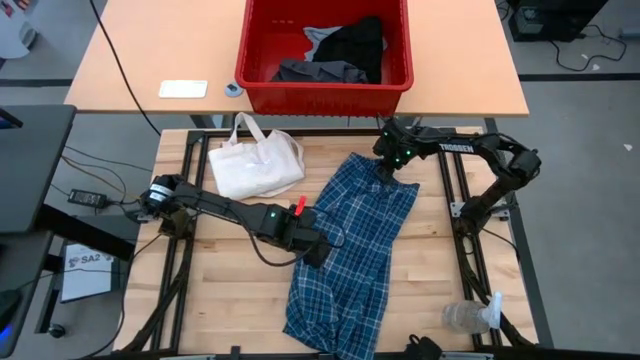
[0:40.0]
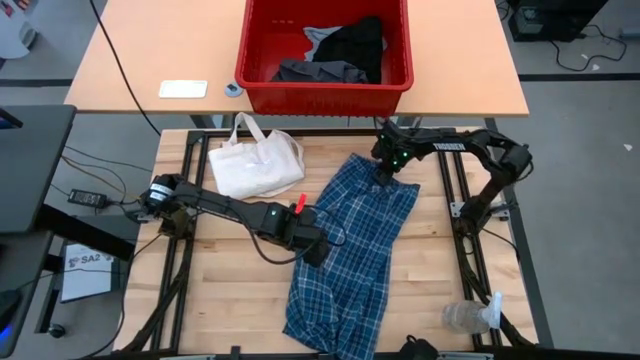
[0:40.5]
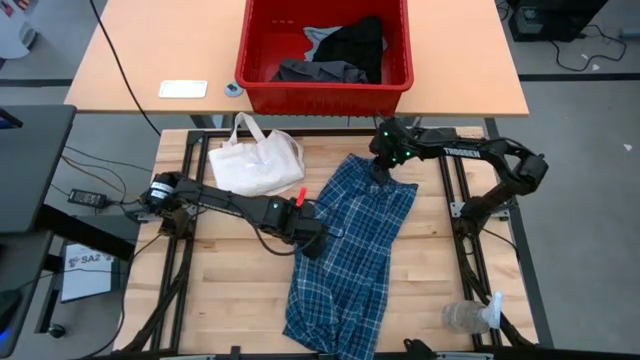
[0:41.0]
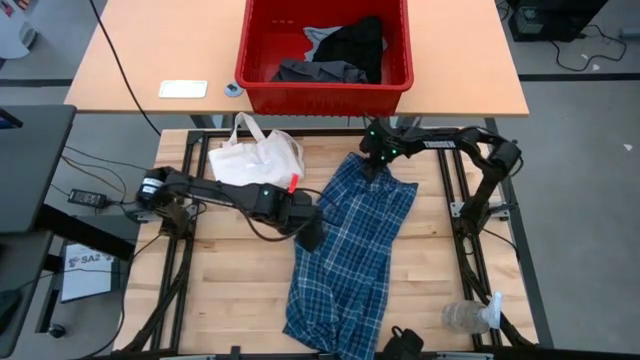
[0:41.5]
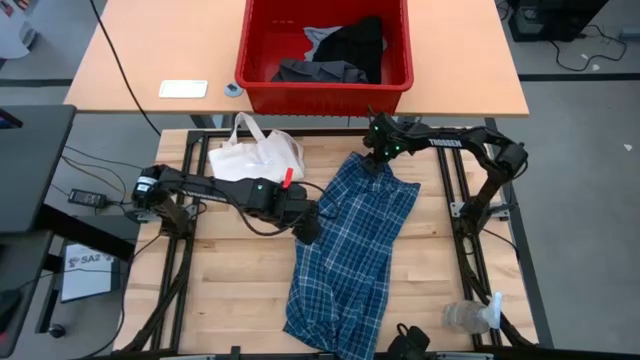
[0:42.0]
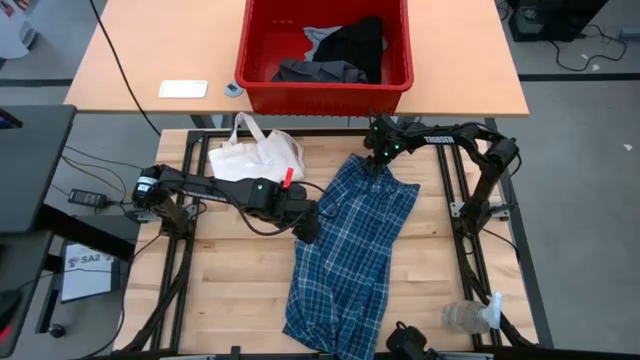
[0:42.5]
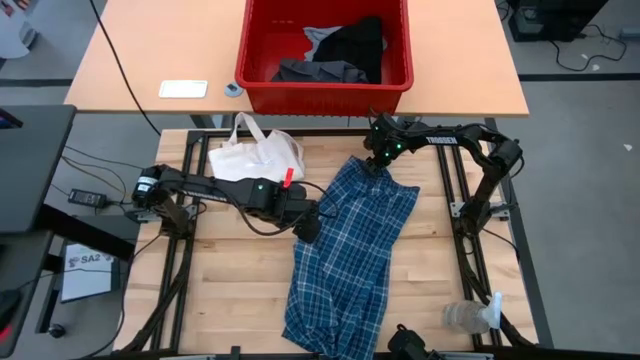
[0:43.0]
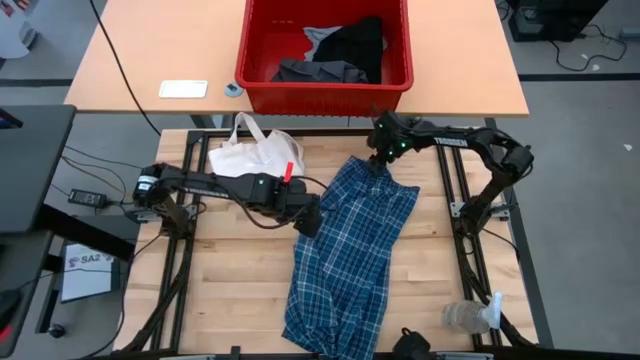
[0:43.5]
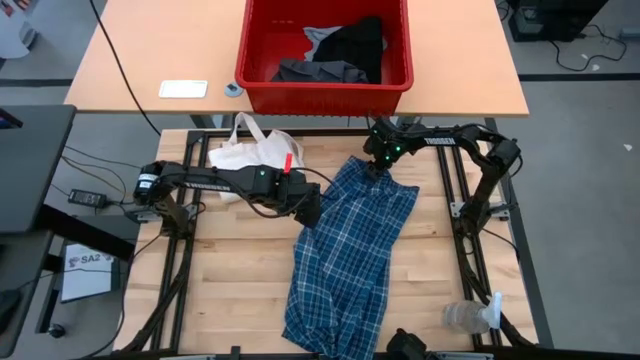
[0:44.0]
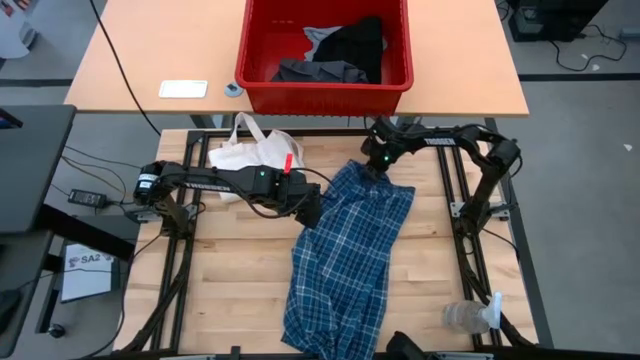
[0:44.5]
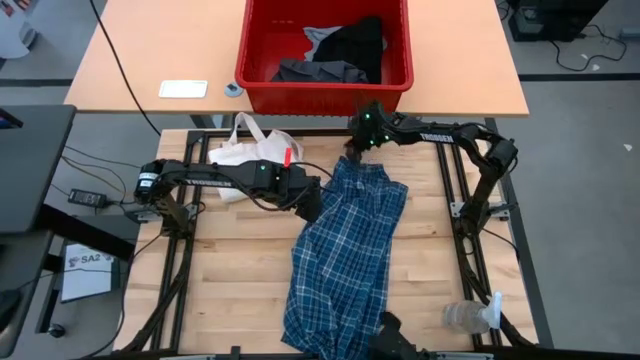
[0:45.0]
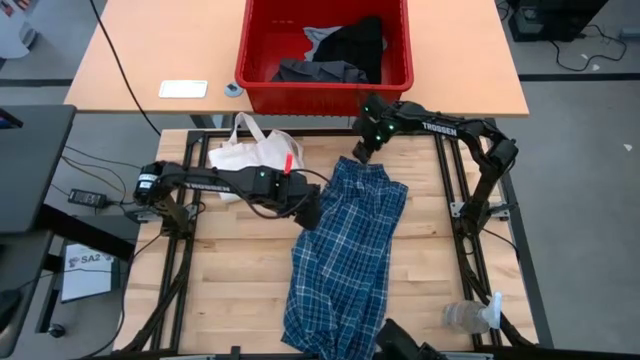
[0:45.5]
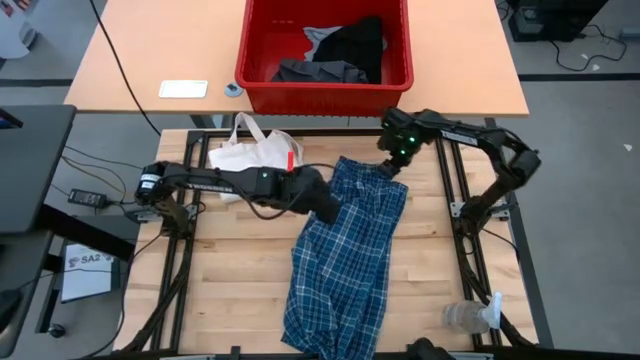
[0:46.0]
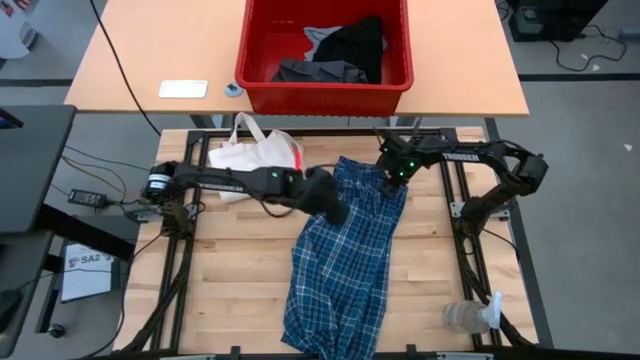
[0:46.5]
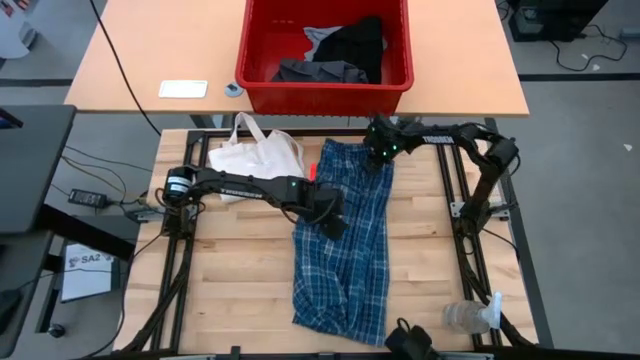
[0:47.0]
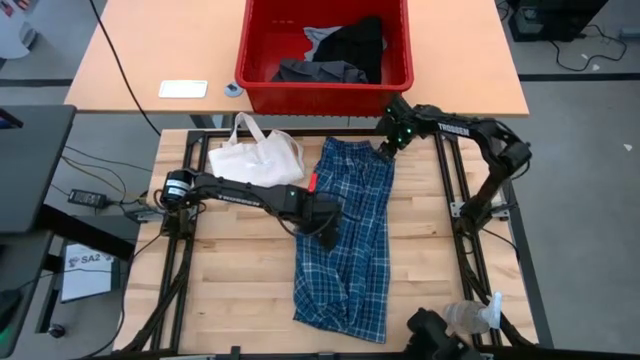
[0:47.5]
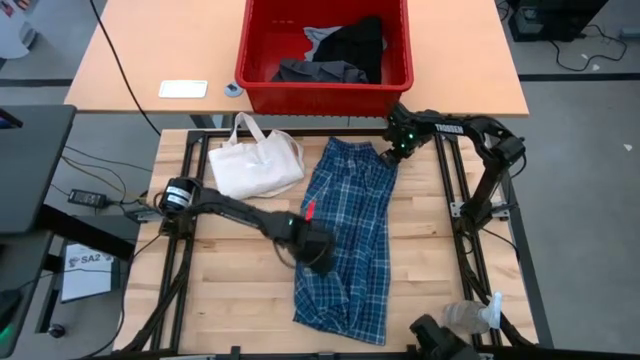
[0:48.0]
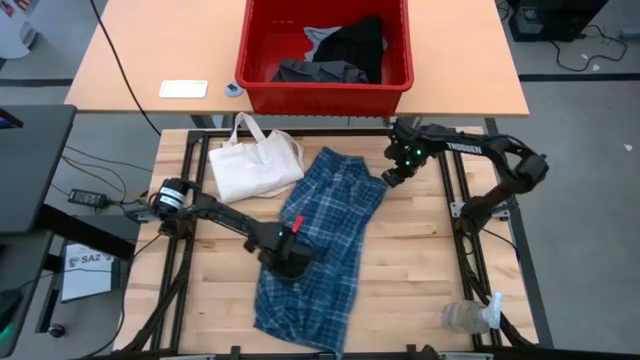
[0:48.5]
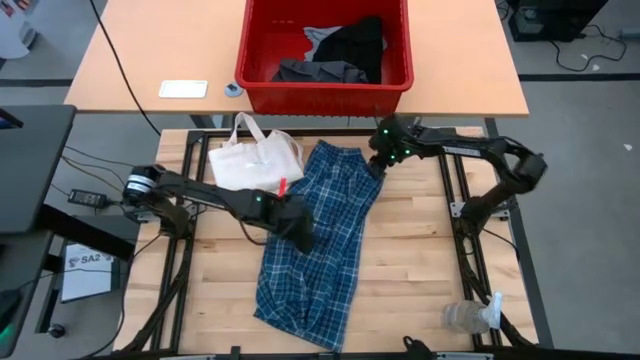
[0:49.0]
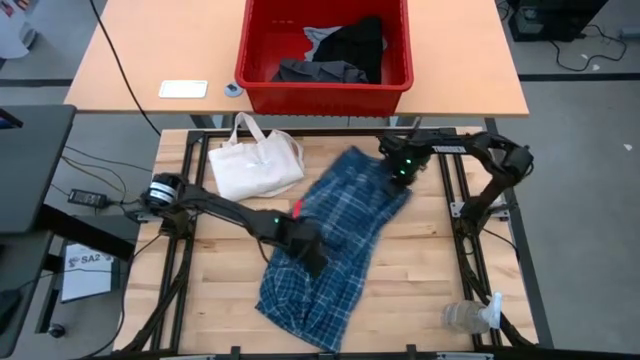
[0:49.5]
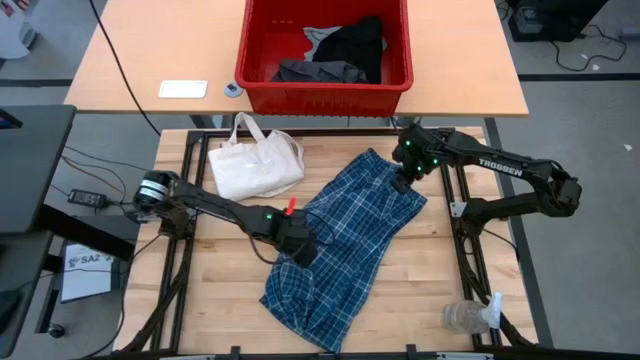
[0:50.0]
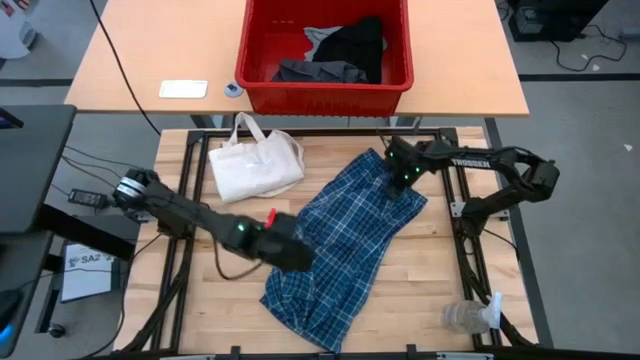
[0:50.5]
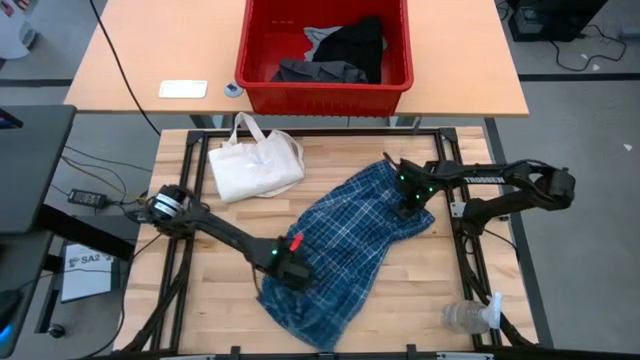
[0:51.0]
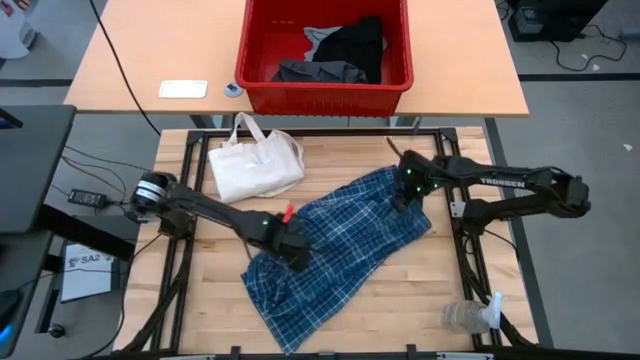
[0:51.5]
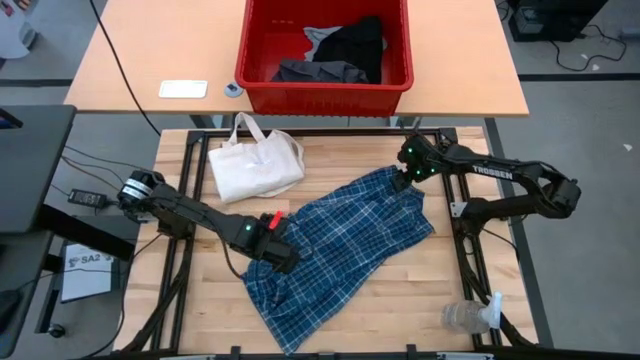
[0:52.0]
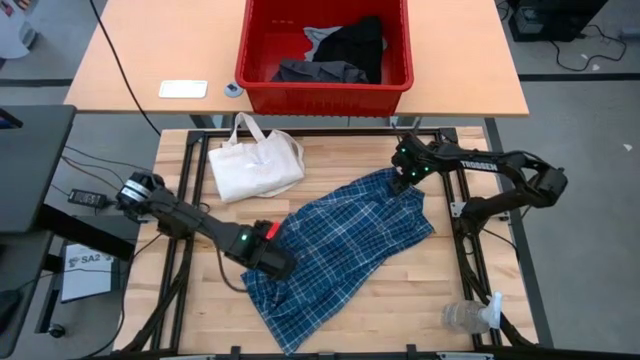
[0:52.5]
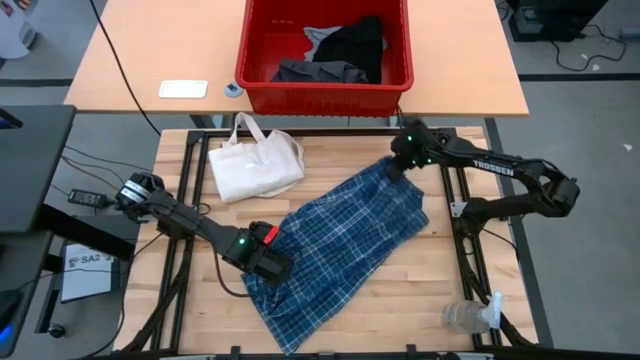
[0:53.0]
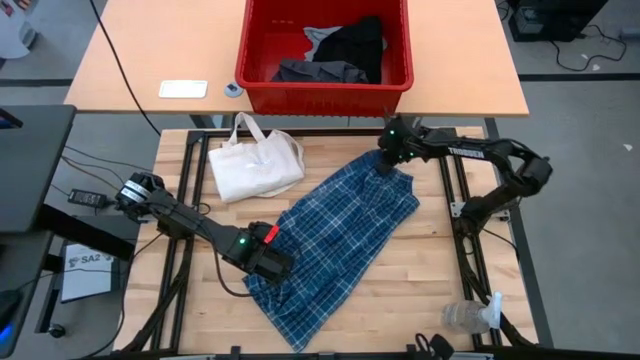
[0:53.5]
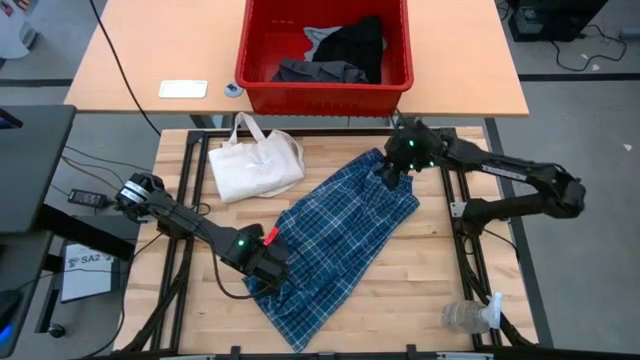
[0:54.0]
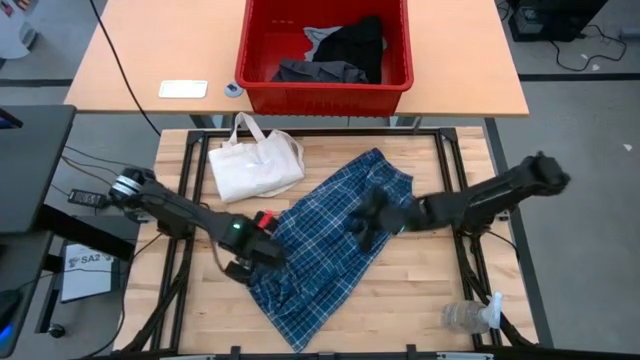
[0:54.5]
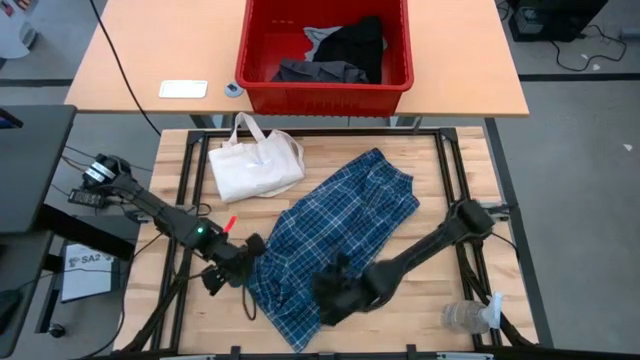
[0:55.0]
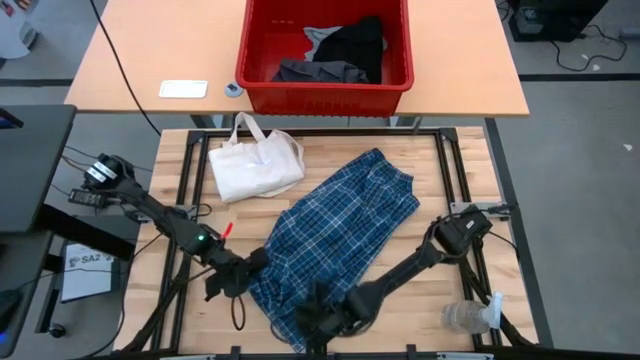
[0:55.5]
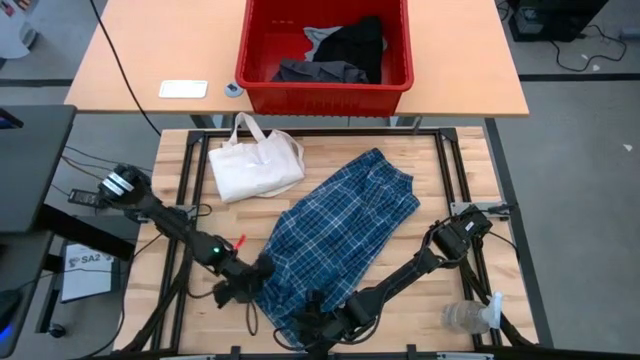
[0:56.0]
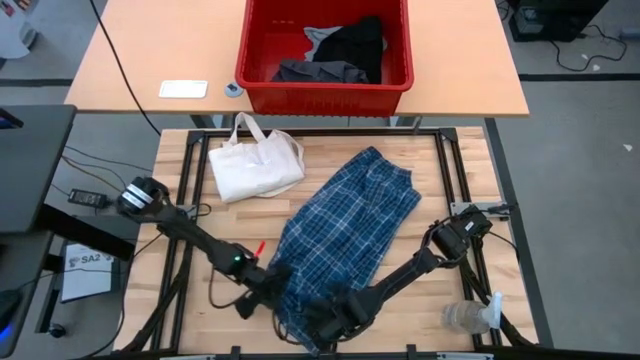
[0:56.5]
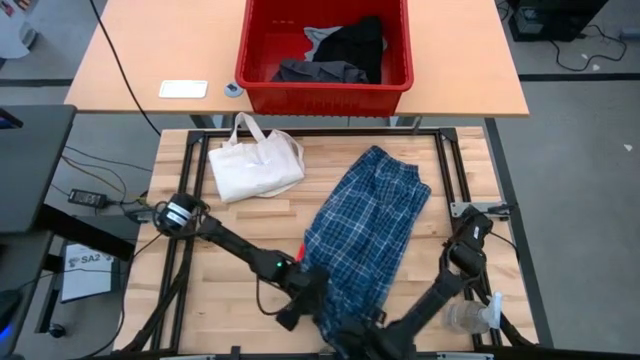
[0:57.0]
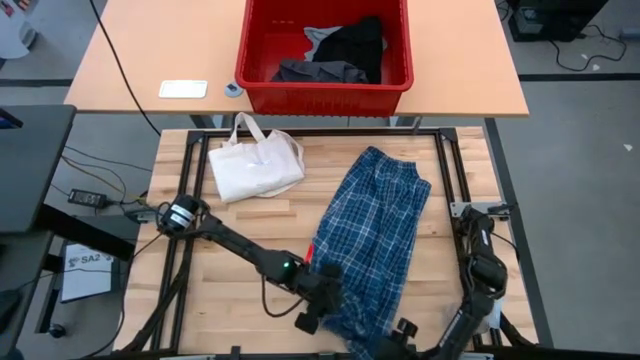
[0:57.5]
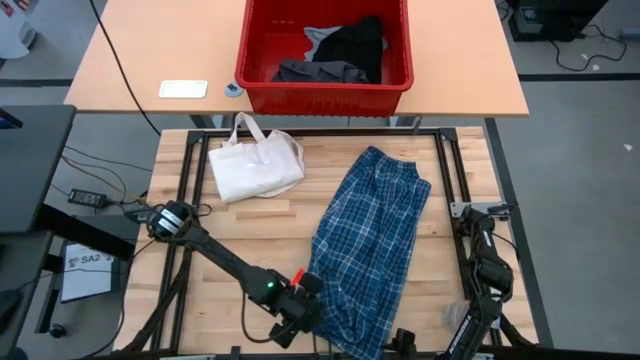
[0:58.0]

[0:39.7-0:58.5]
Task: Fold laundry
Fold the blue pants

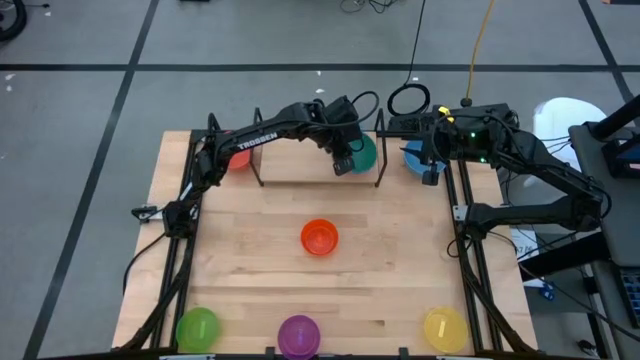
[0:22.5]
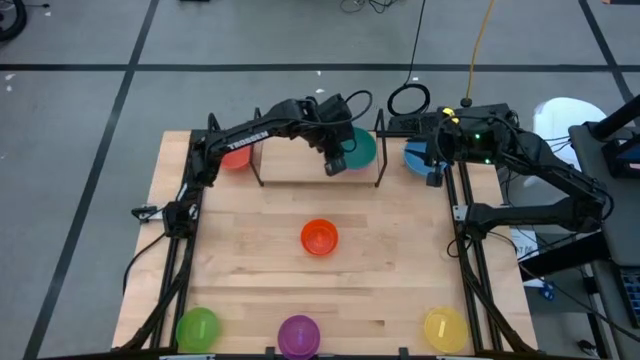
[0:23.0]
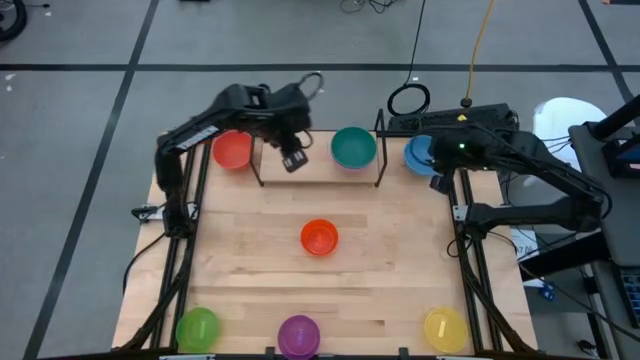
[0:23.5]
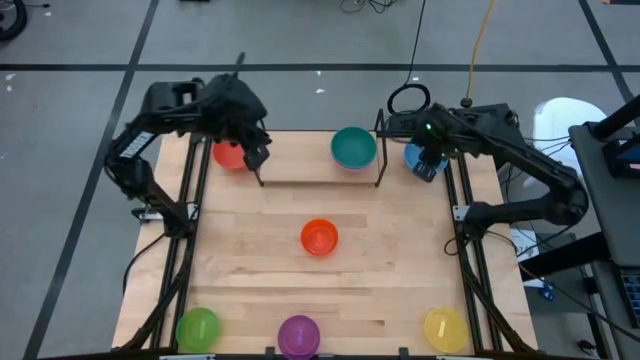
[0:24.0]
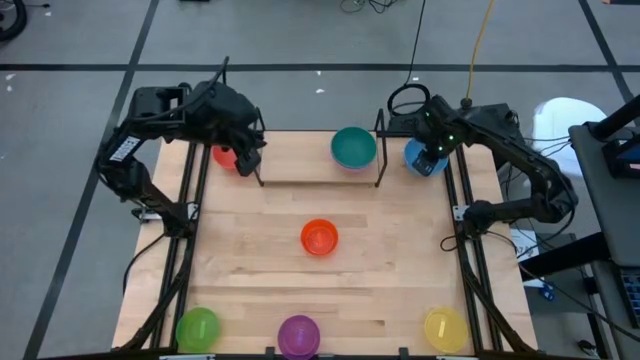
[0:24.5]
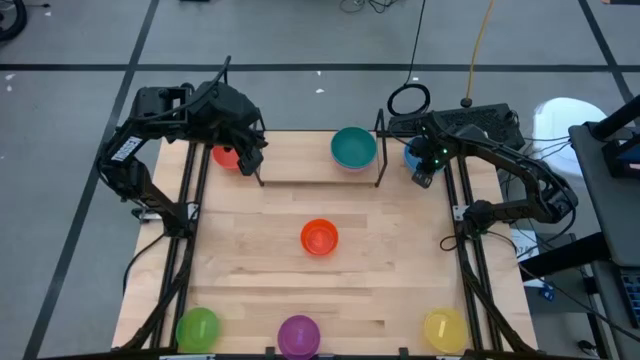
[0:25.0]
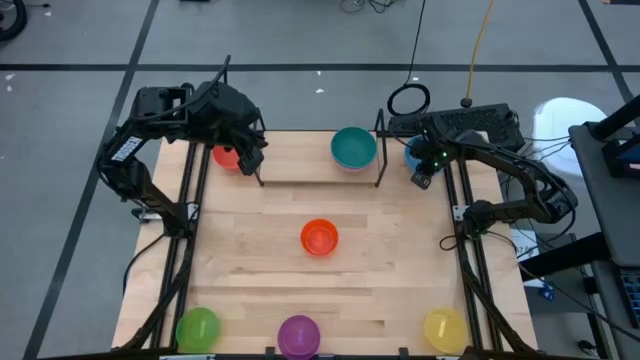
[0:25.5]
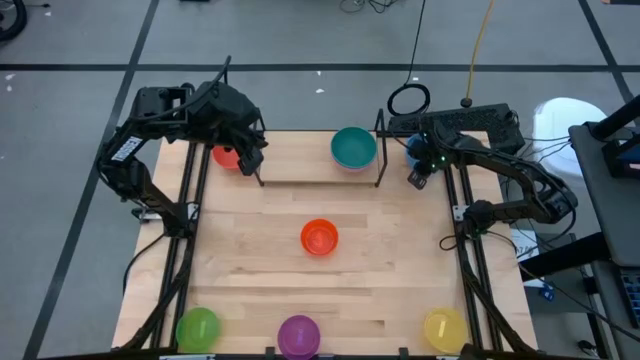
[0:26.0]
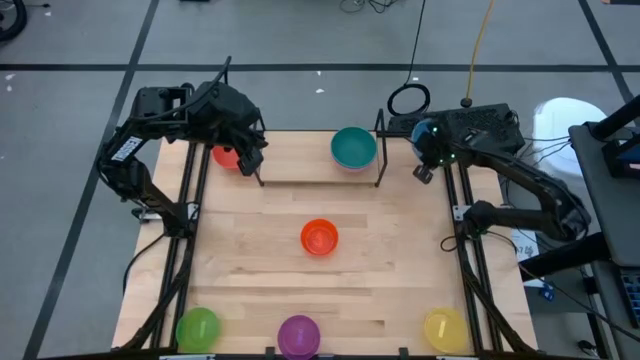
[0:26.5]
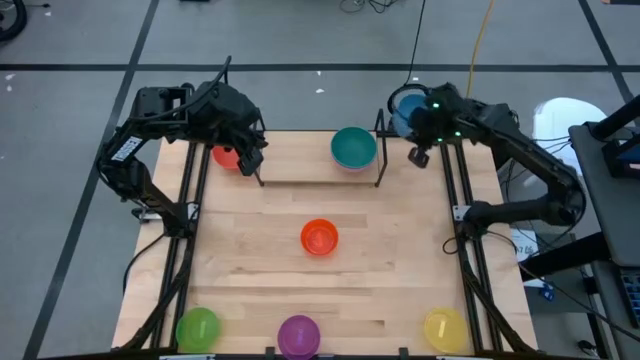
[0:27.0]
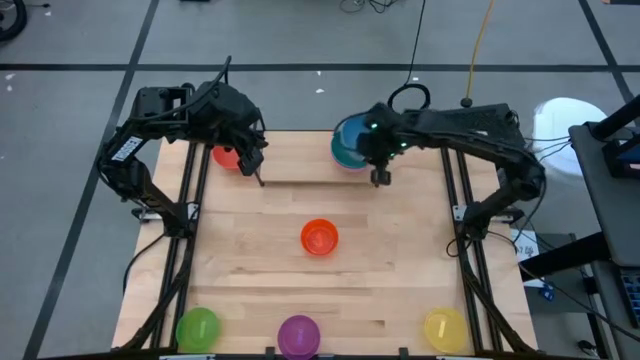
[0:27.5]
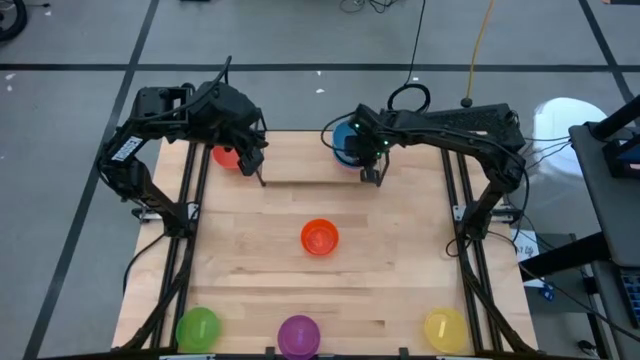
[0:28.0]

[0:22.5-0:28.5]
Task: Place and stack bowls onto a shelf
Stack the blue bowl on top of the dark green bowl on the shelf
